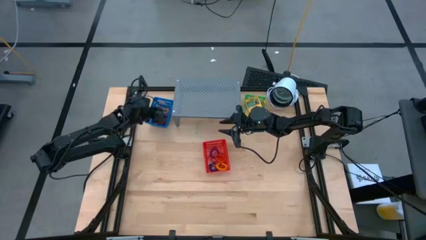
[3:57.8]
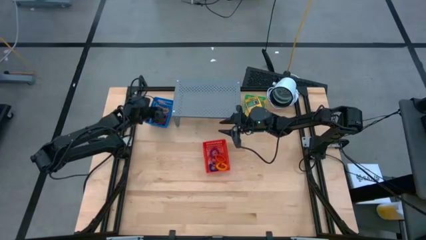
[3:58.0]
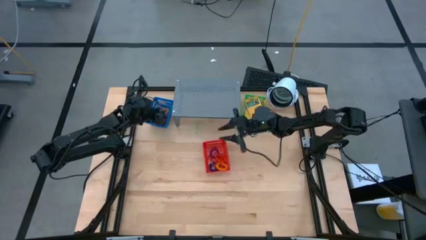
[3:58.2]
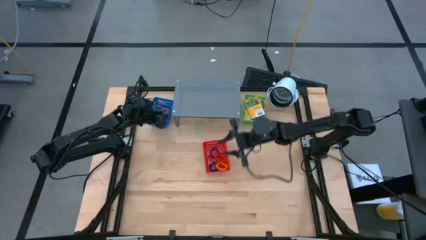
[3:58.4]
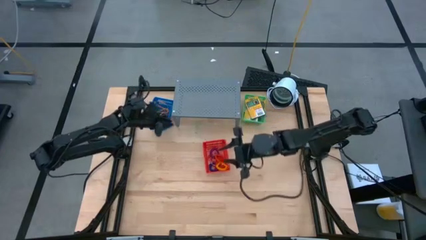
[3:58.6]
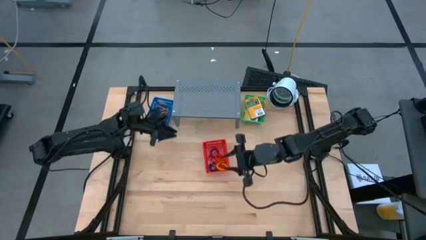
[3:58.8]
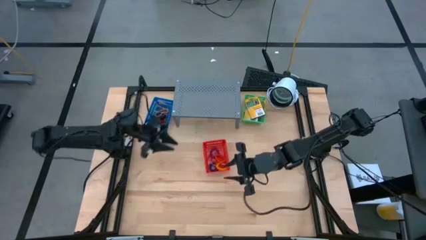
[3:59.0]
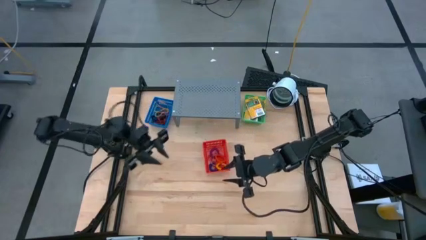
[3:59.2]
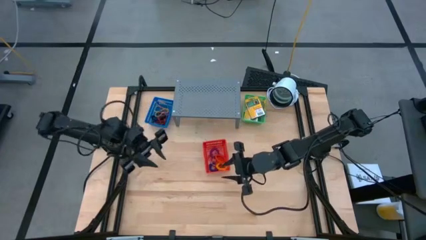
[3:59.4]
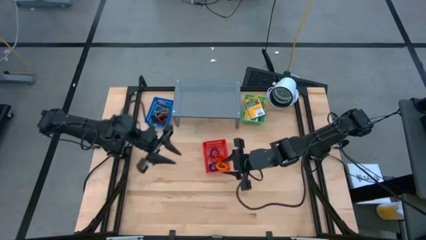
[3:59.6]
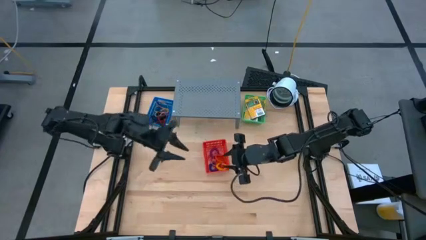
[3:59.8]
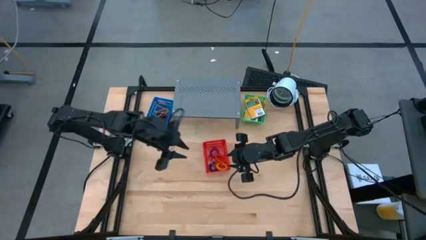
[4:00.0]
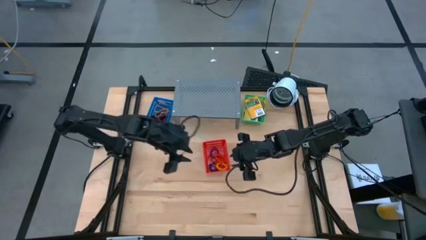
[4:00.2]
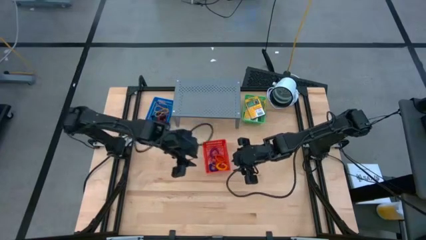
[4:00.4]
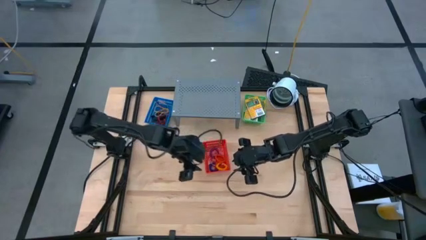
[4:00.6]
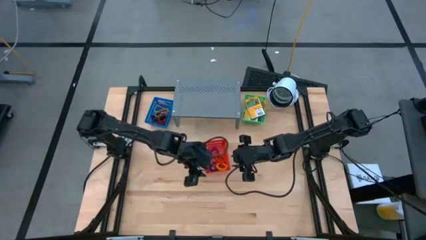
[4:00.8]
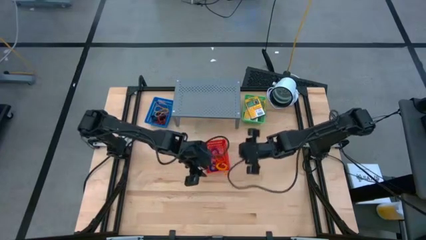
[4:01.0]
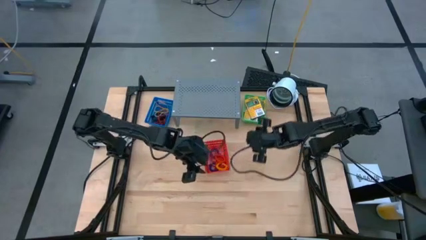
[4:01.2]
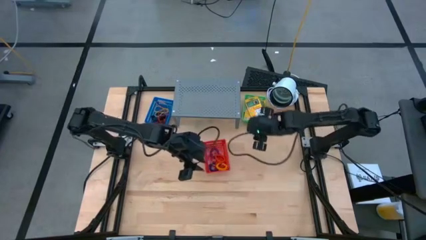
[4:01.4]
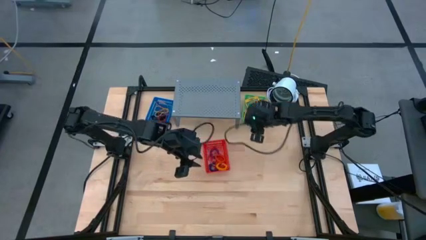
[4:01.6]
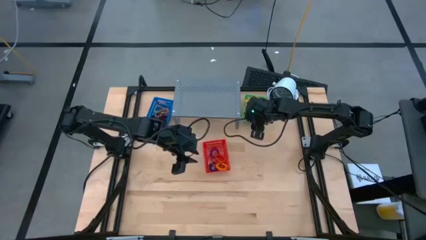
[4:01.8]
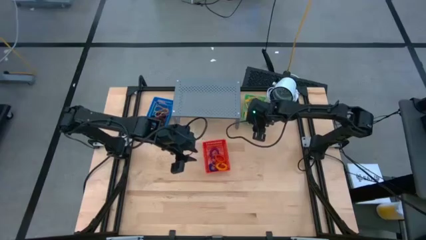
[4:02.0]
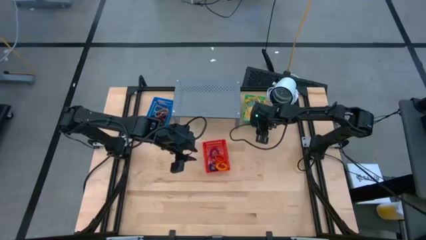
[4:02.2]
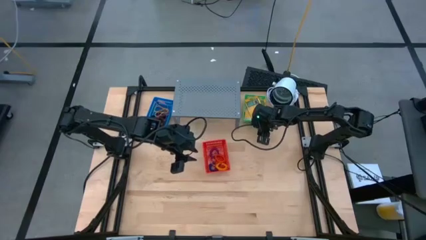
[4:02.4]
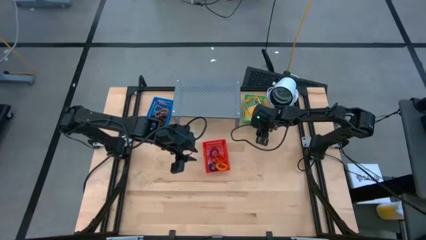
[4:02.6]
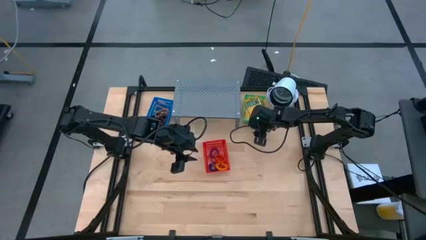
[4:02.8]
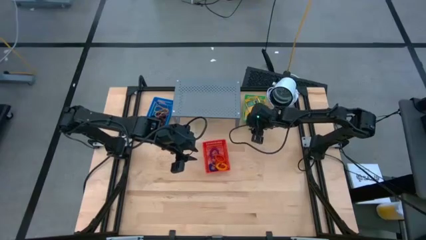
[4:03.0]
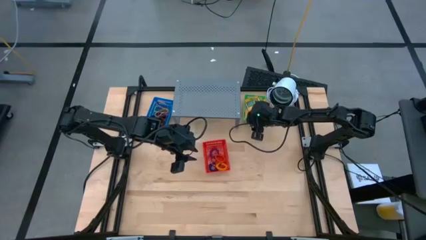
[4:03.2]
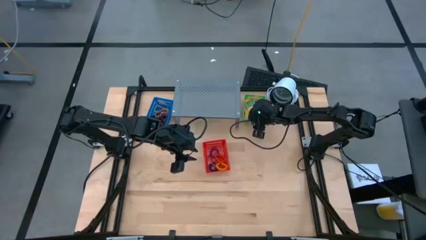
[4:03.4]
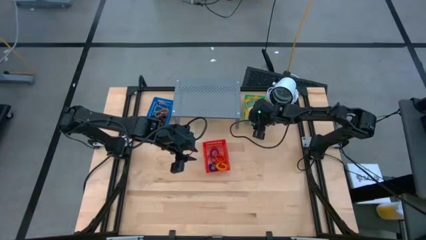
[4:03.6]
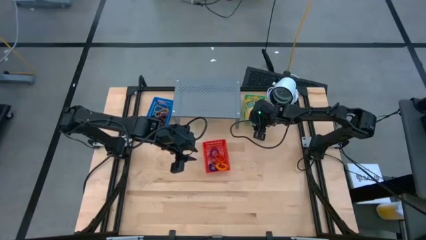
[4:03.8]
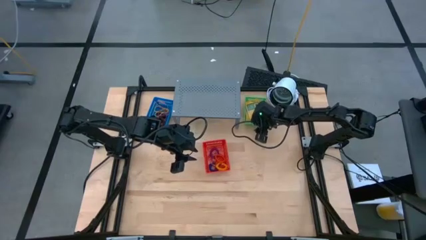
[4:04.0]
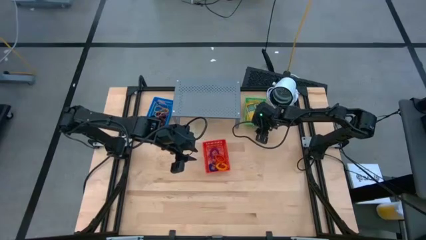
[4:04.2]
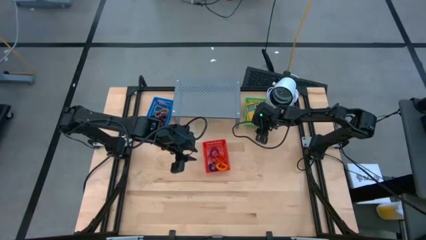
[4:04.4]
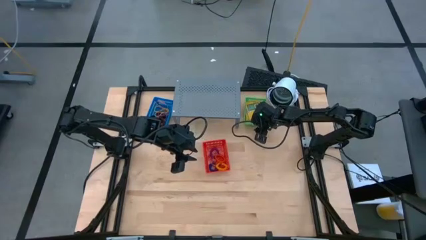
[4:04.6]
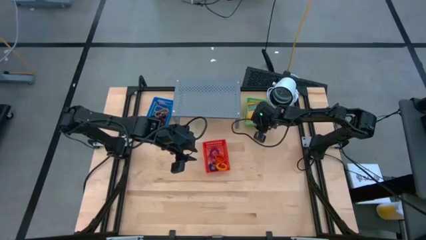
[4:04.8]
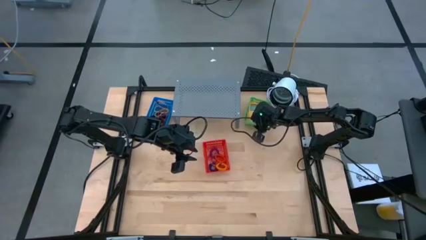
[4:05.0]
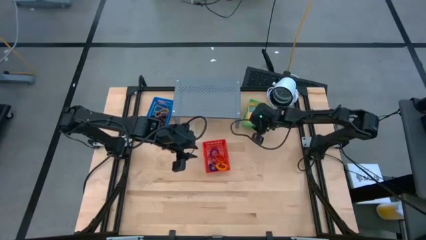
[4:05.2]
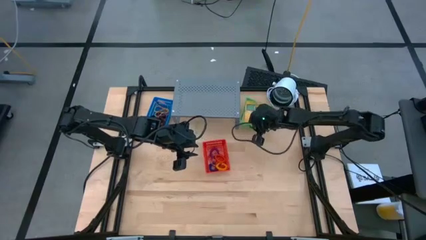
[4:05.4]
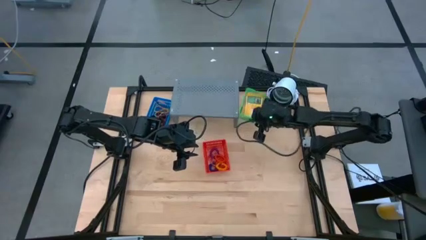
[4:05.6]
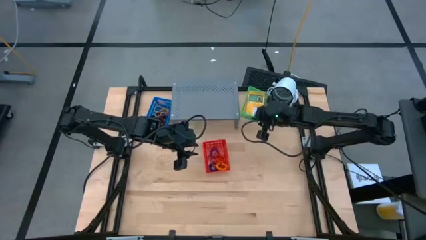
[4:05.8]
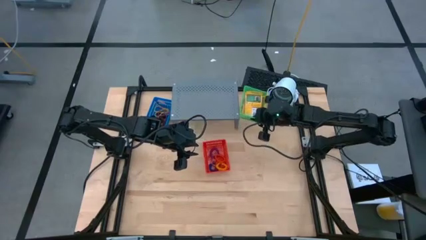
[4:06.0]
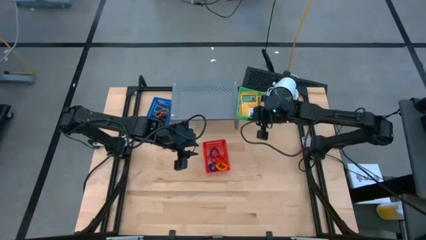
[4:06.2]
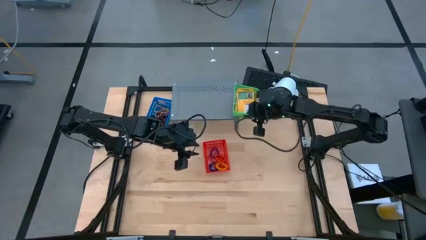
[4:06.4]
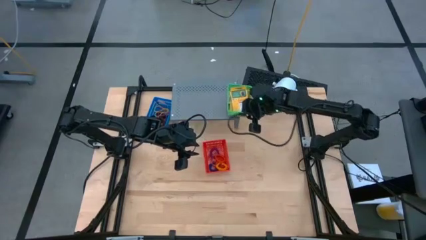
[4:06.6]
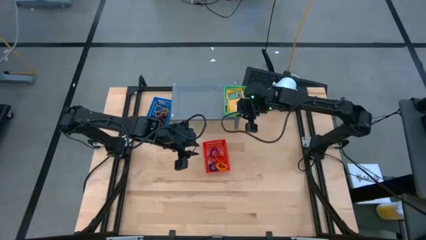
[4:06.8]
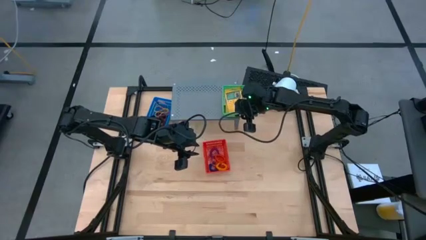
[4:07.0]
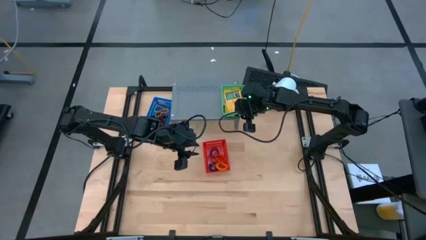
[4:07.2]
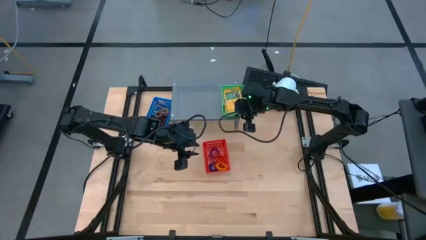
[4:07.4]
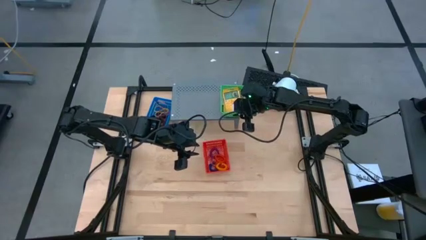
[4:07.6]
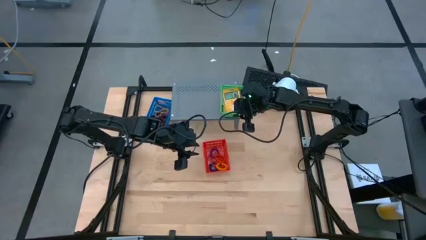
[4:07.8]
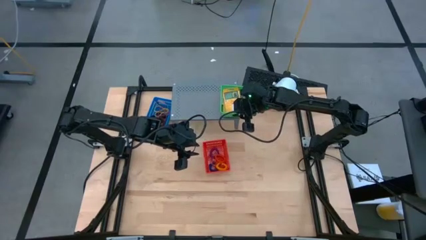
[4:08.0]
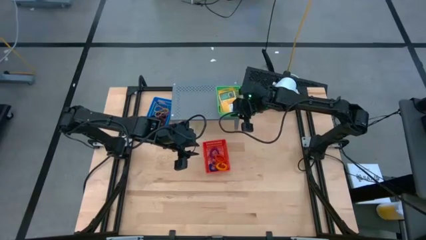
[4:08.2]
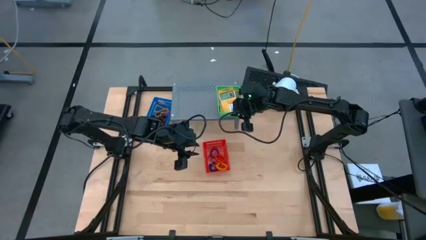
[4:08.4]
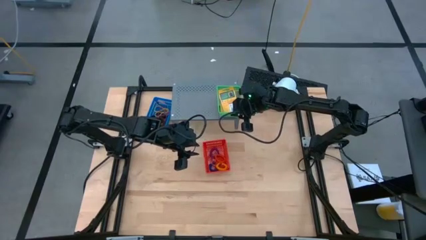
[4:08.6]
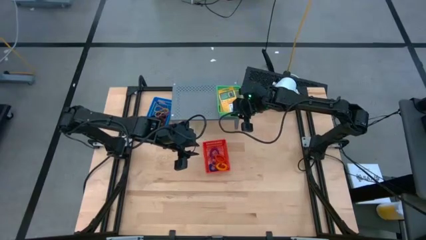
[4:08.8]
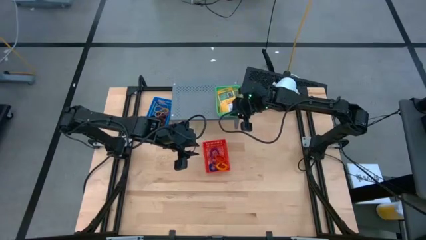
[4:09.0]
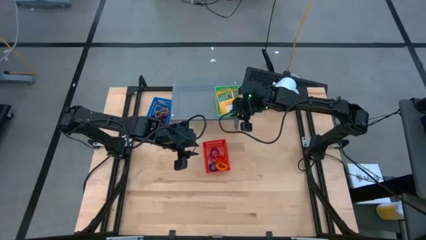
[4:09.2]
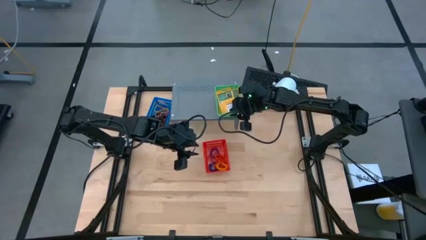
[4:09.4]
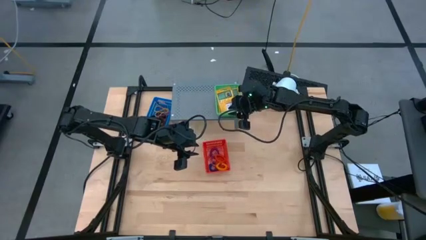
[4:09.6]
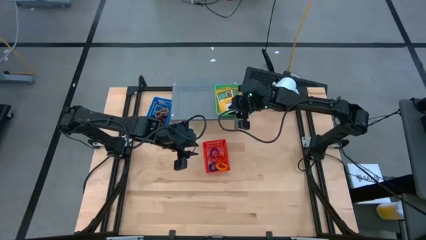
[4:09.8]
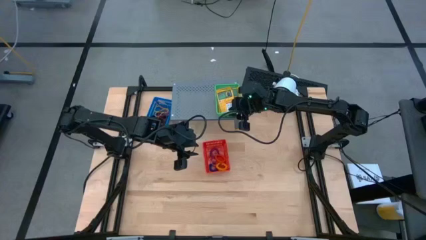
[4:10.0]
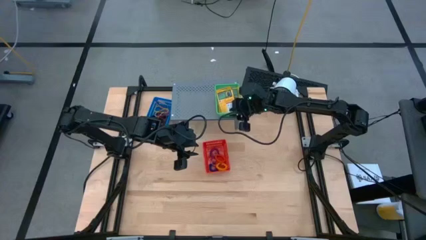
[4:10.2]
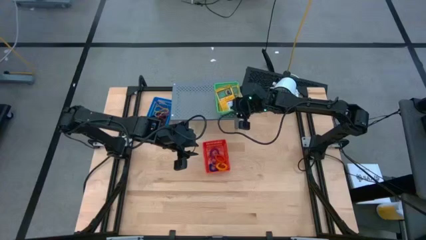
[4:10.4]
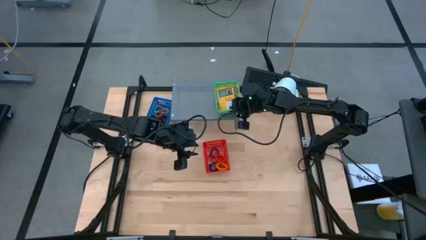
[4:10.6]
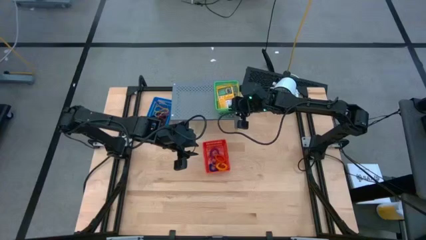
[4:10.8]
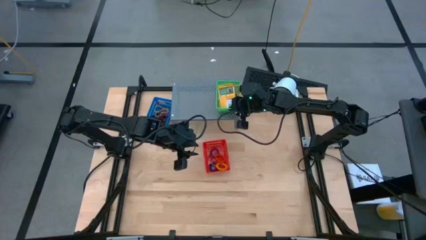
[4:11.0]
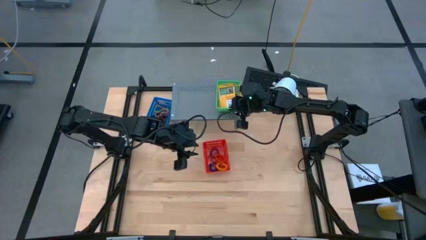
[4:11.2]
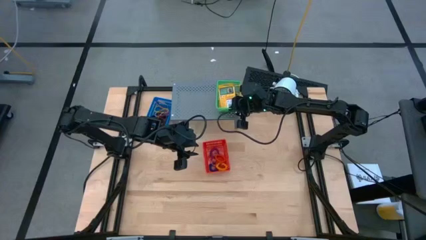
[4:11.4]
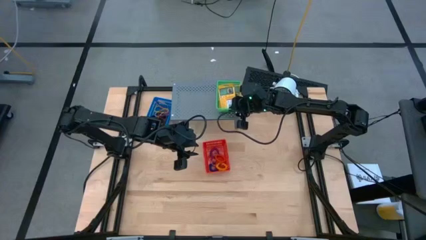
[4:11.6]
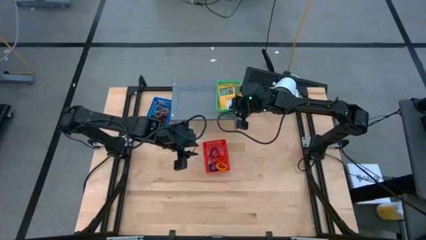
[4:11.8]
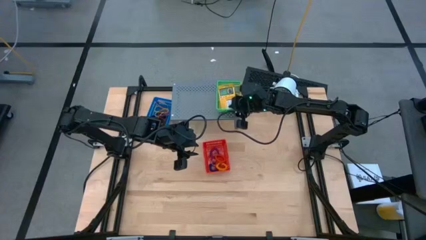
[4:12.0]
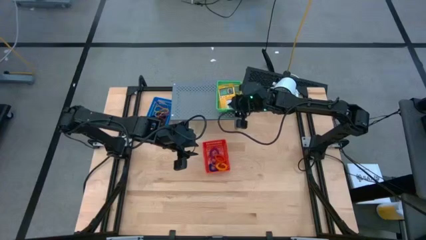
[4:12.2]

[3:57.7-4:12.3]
Task: Pick & Place Office Desk Supplies
Put the green basket on the shelf
